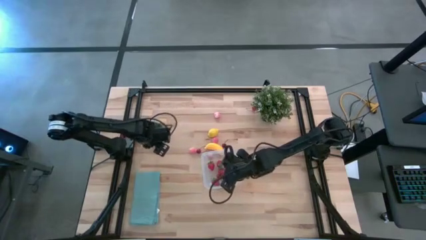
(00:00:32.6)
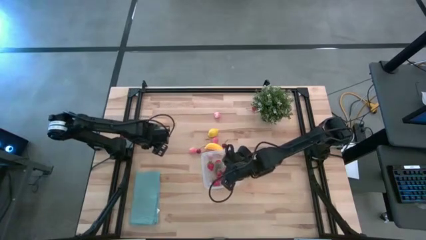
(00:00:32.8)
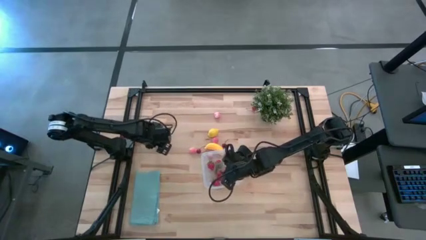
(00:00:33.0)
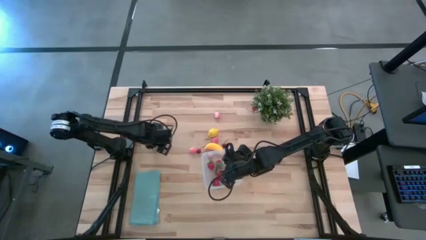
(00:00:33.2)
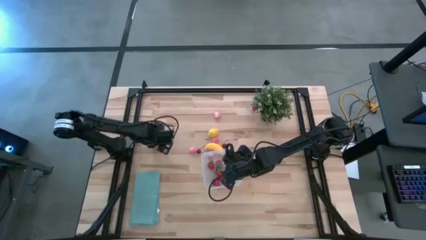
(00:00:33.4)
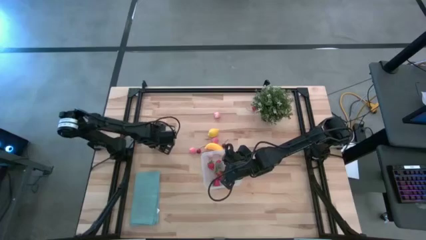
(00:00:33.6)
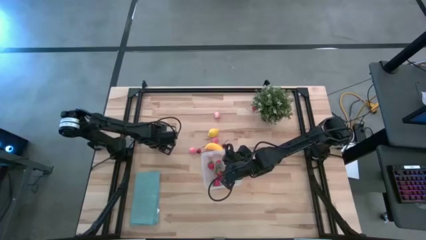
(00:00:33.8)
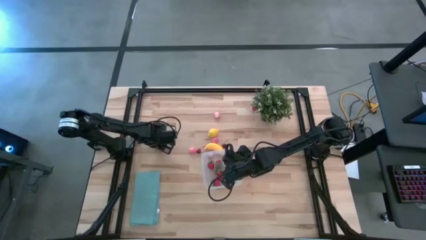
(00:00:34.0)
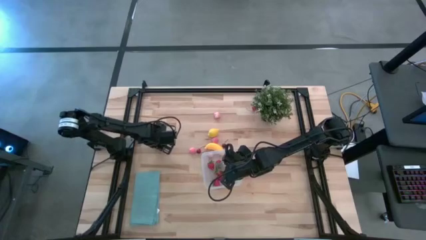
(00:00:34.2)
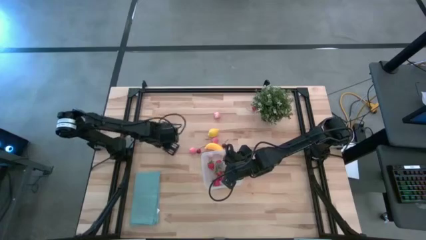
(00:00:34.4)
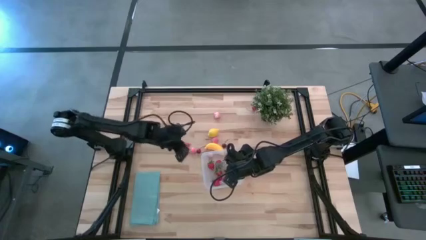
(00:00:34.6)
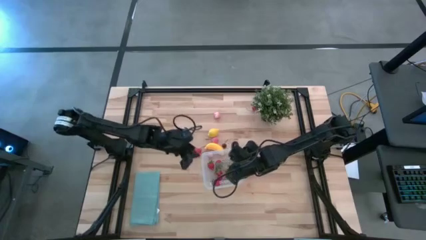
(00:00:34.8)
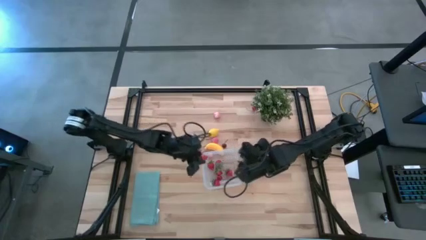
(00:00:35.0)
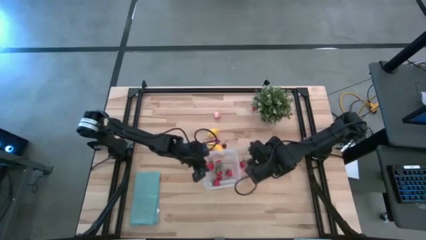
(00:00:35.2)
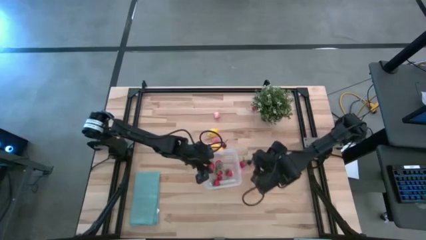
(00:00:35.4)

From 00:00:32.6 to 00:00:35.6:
Task: Pick and placing Produce into tupperware
Put the red strawberry into the transparent bin

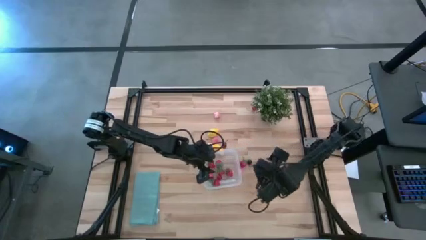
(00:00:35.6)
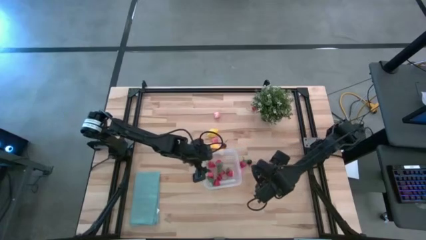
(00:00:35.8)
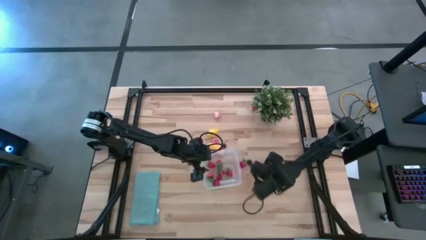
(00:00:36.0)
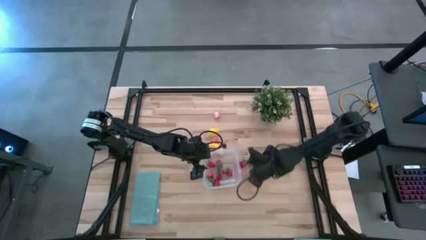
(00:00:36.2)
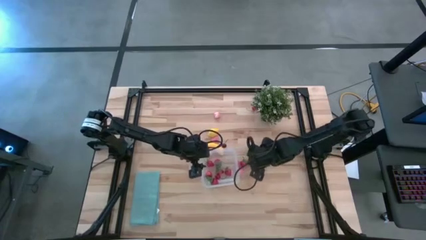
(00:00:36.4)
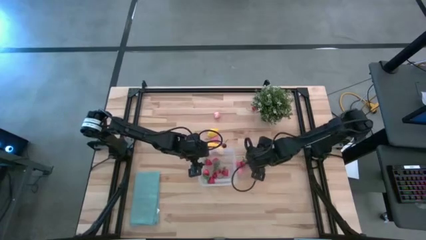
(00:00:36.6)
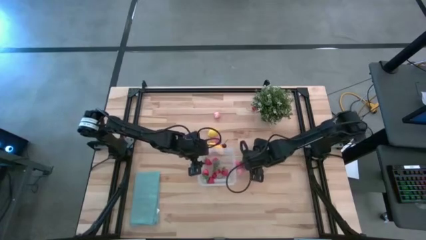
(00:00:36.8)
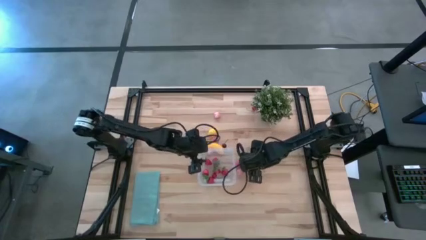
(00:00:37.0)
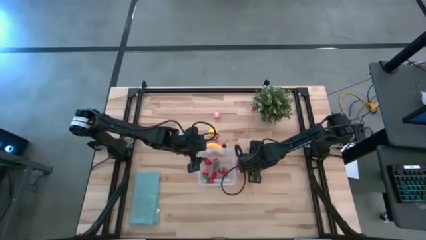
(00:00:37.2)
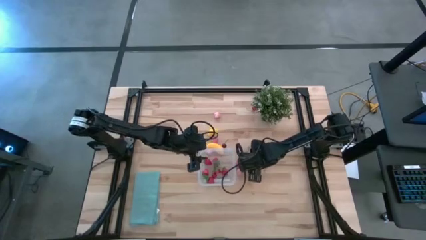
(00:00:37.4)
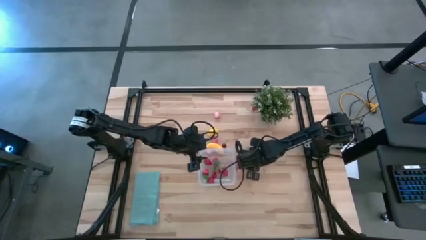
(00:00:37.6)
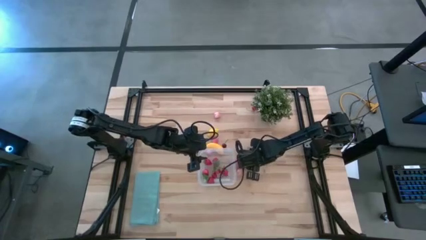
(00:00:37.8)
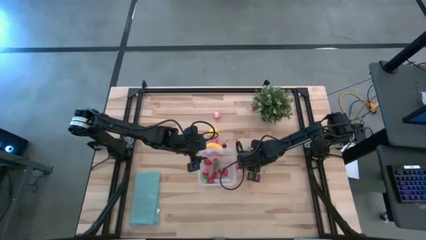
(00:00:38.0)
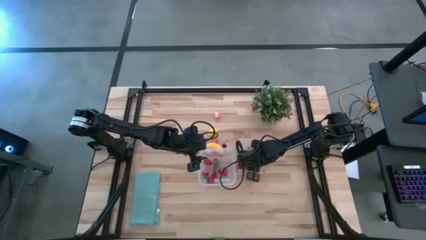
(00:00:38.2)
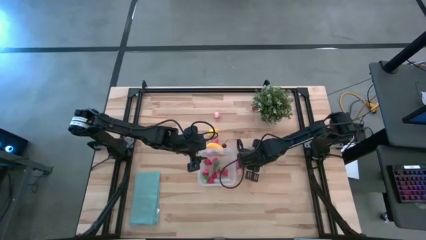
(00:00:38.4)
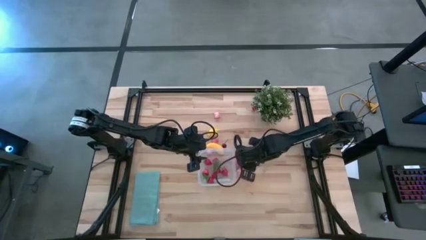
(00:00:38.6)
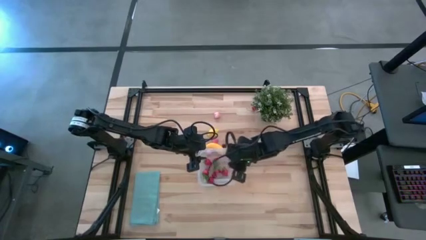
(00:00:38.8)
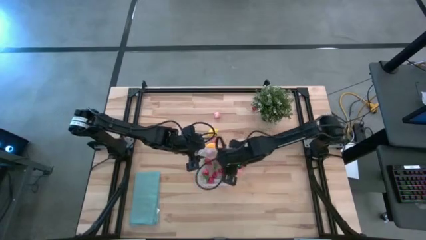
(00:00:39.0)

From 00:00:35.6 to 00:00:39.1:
Put the black cherry into the transparent bin

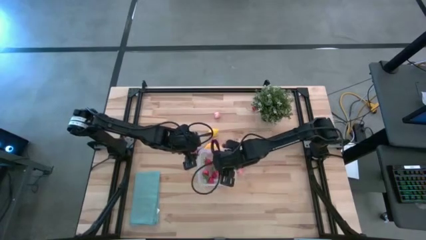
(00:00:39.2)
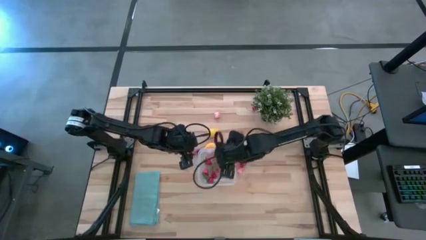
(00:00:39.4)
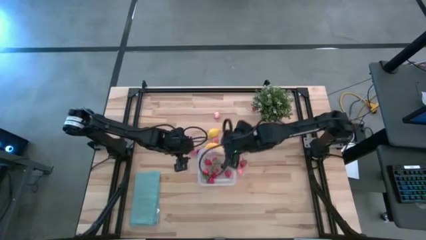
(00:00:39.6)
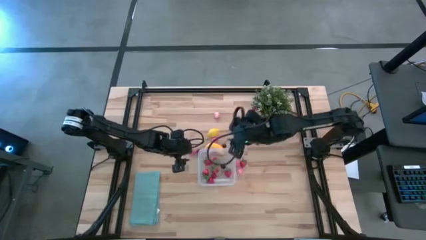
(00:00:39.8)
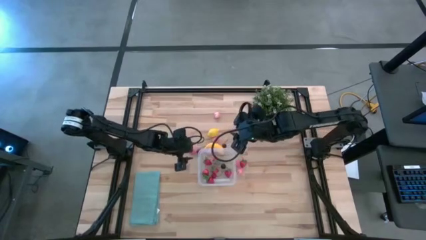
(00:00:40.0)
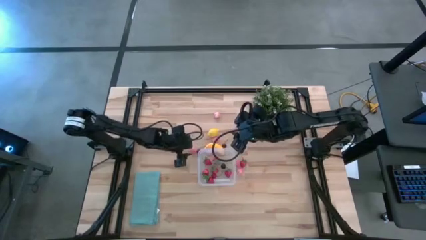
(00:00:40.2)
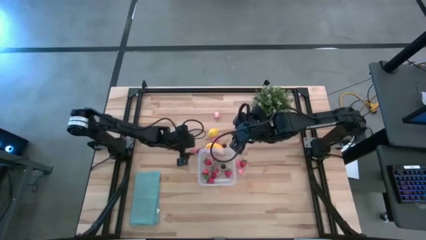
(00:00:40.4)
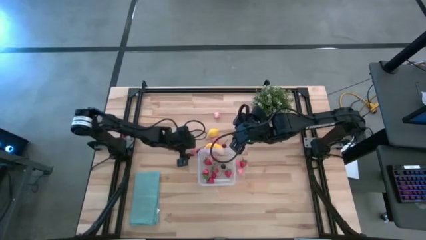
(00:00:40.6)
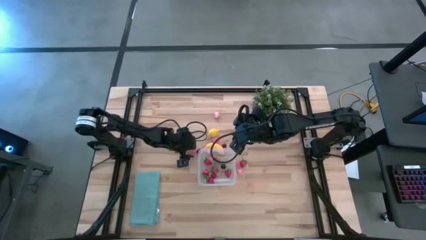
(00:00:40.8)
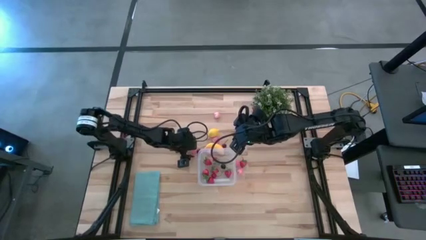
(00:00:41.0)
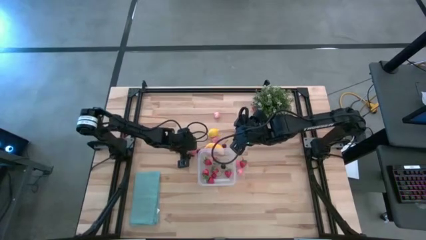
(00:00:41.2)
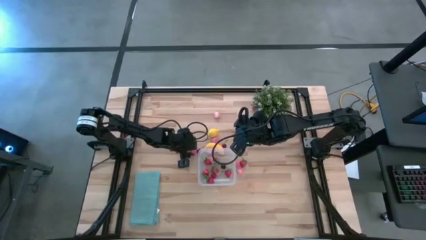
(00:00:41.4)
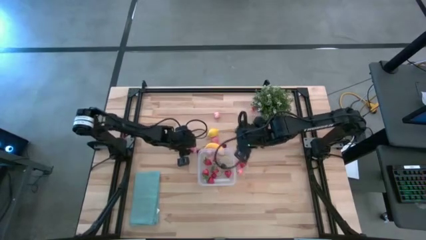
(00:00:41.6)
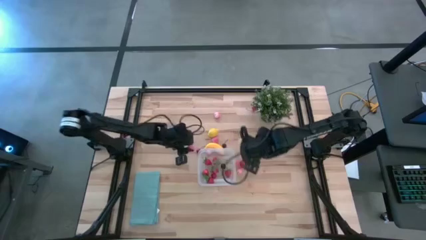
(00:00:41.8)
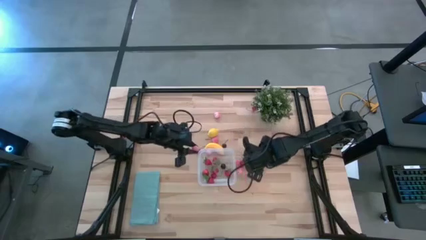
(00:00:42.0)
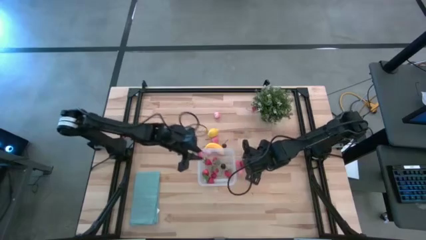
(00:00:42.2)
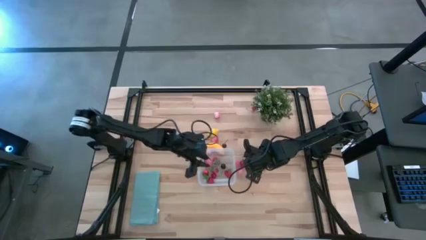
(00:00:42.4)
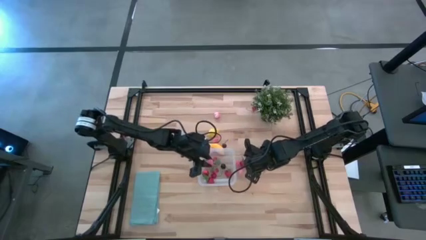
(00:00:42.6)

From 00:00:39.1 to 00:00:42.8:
Put the pink peach into the transparent bin

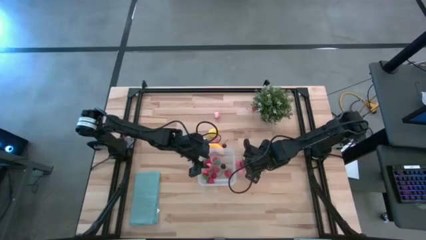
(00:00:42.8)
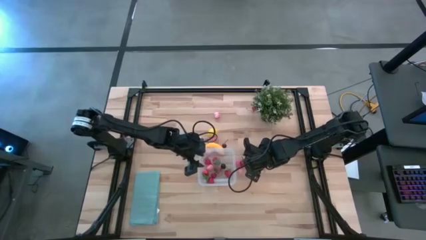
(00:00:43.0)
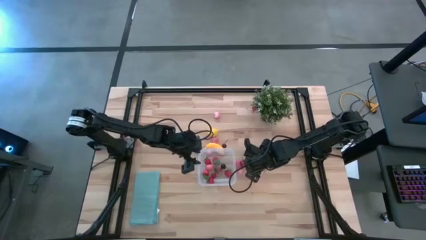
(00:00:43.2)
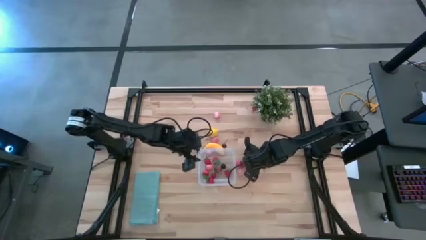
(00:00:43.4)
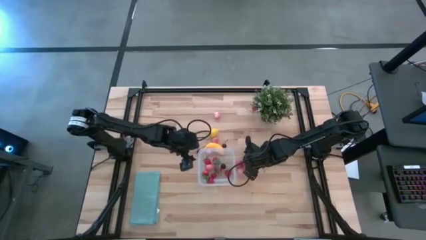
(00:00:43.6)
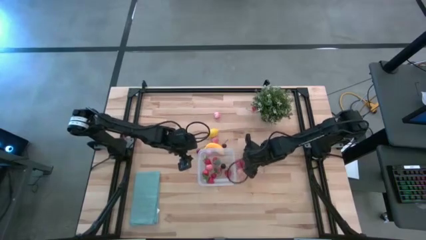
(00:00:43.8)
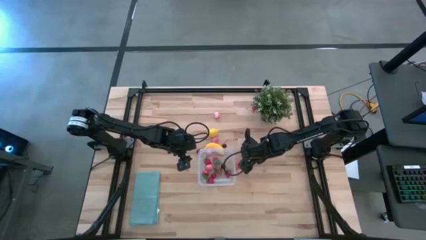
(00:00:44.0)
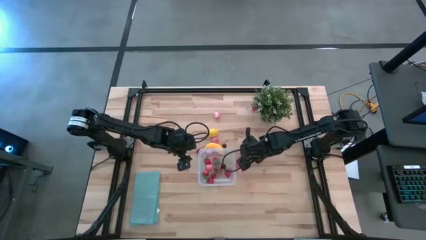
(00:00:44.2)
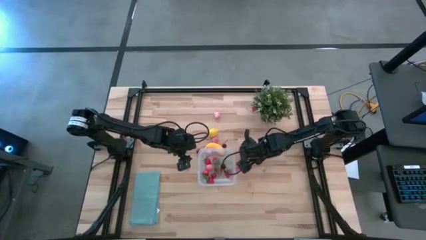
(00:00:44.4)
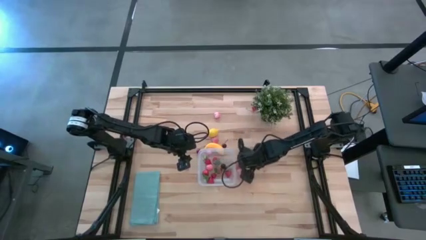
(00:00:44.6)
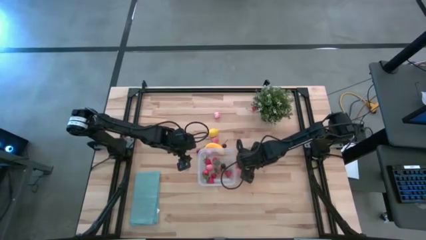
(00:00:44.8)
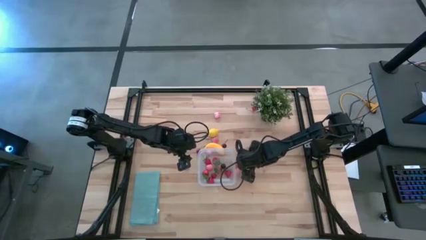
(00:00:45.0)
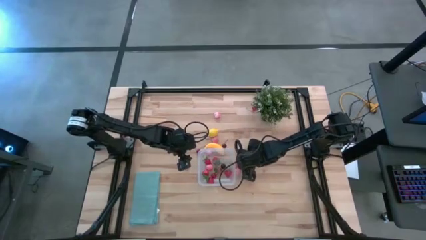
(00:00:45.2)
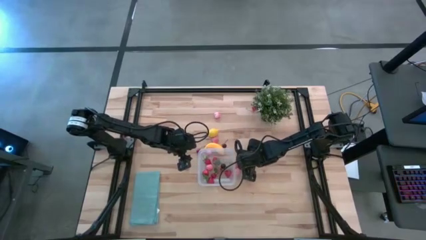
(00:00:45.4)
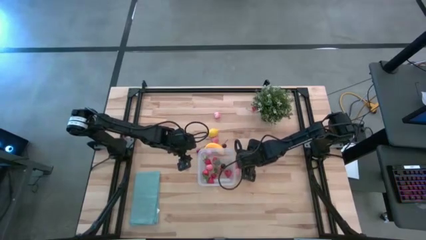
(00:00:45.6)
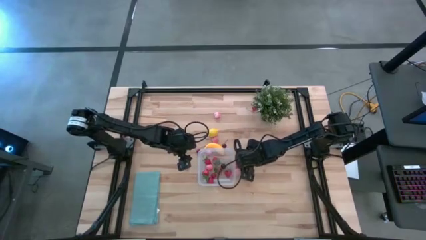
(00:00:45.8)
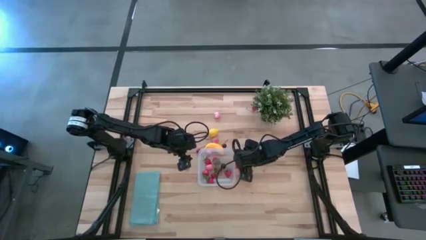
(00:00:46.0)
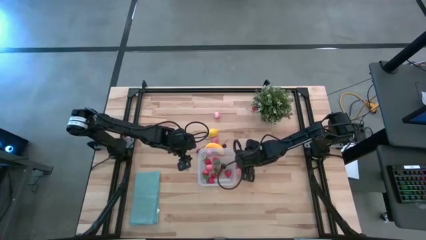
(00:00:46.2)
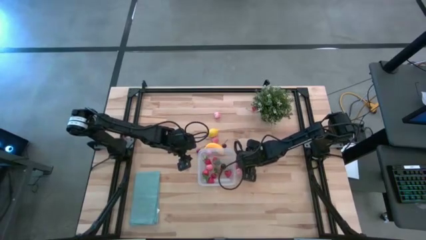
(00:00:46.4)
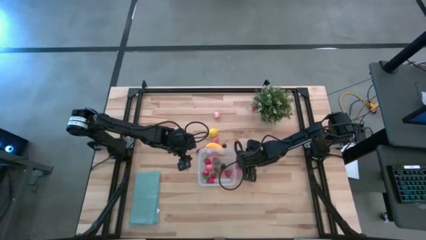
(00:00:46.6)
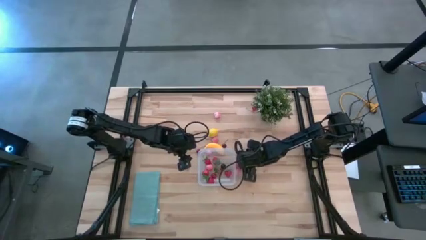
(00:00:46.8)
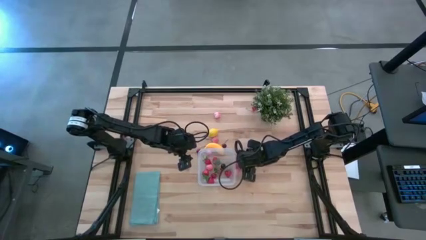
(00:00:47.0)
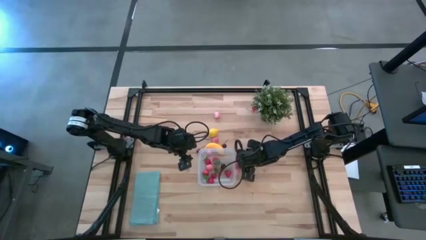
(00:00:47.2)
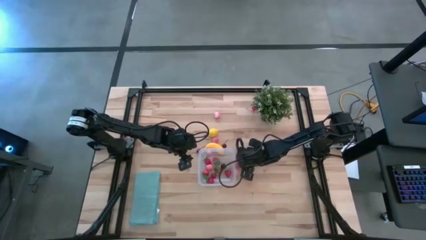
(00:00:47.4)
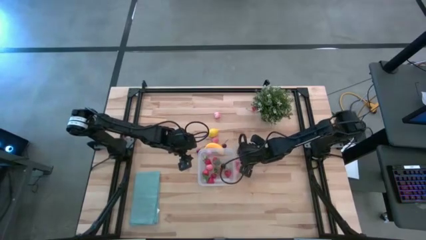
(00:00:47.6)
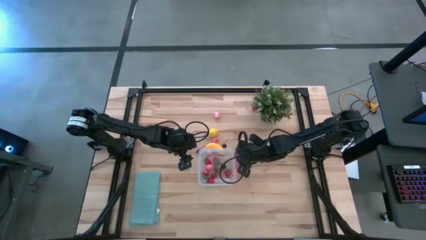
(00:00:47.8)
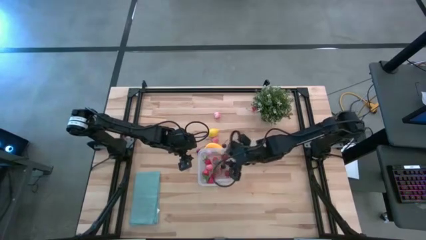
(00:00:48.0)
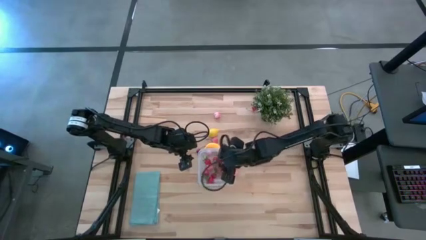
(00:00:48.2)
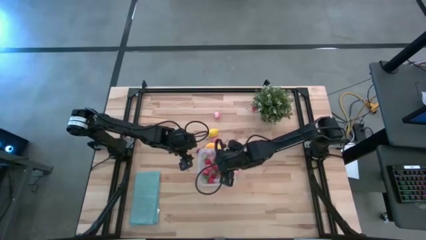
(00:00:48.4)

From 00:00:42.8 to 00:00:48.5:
Put the red strawberry into the transparent bin

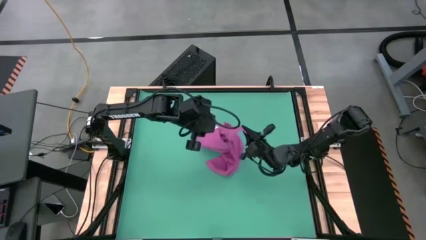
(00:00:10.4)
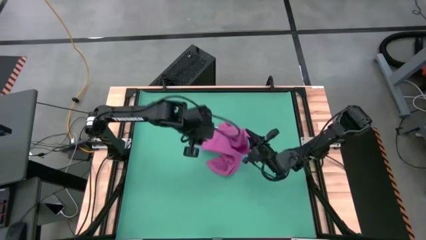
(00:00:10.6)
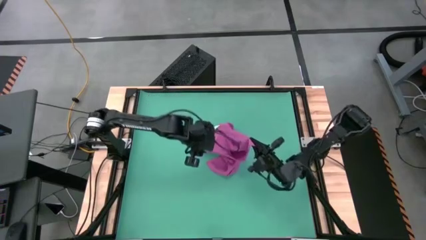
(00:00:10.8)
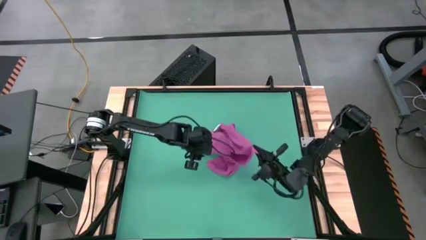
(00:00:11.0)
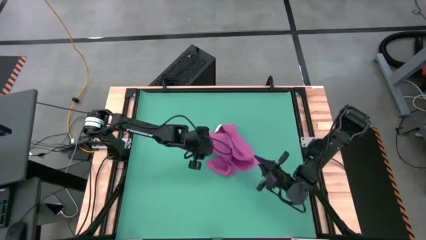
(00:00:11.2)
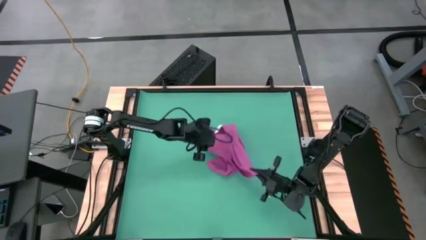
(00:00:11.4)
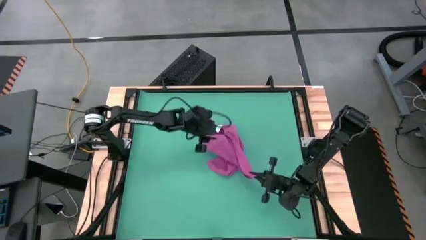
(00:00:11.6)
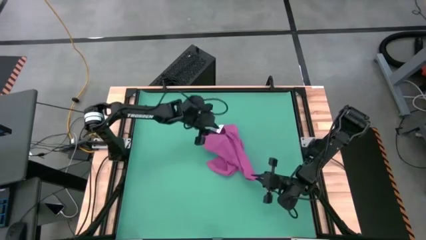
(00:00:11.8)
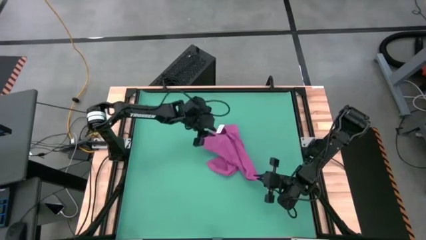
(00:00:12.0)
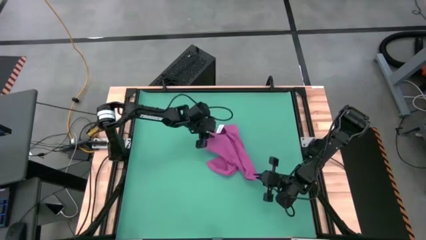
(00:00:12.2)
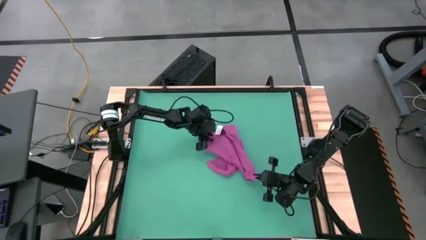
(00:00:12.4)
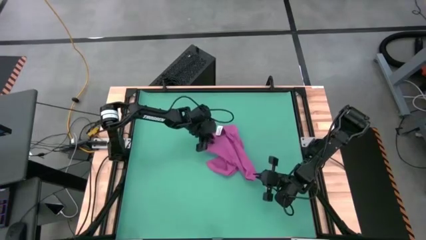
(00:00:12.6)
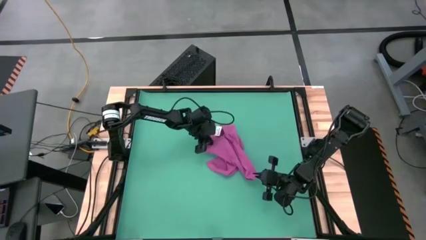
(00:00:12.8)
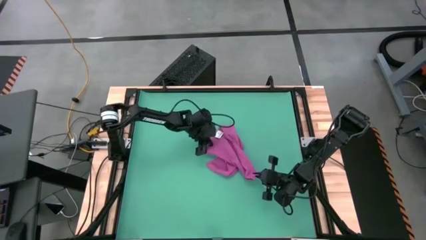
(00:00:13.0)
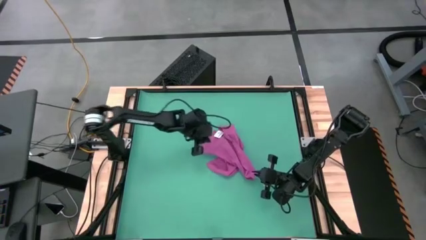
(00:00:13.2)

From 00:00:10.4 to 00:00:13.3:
Task: Roll towel into tight, uniform cylinder
Roll the pink towel
